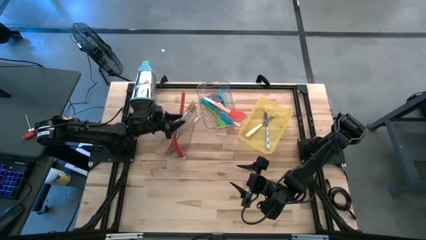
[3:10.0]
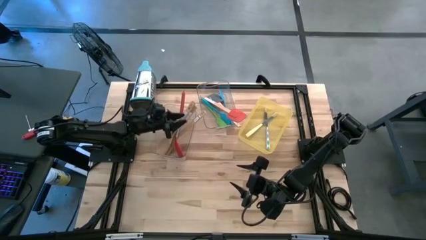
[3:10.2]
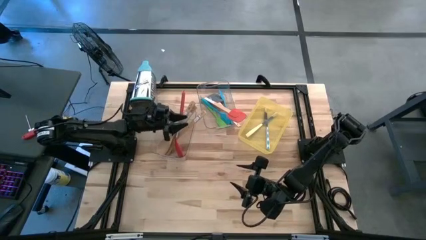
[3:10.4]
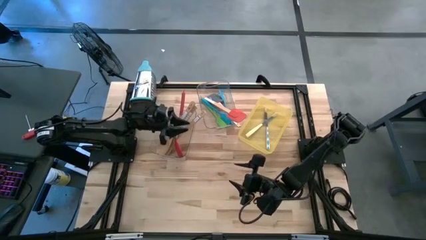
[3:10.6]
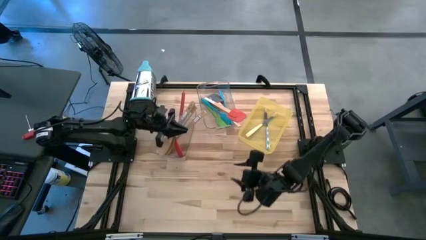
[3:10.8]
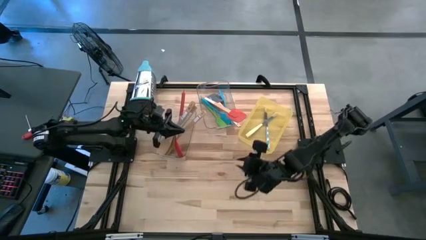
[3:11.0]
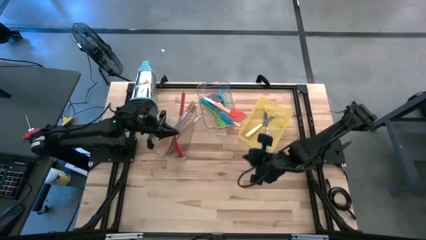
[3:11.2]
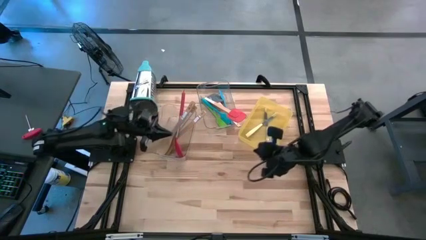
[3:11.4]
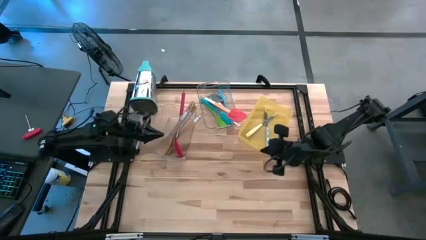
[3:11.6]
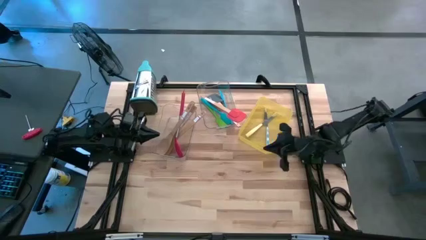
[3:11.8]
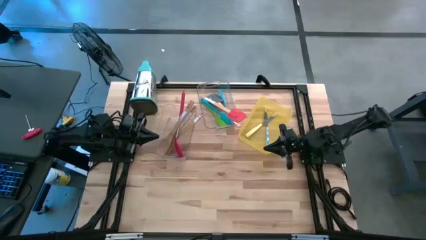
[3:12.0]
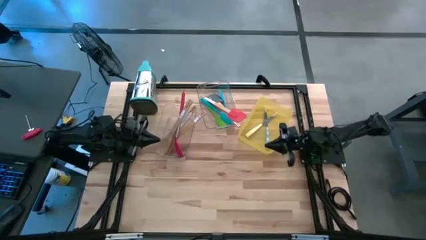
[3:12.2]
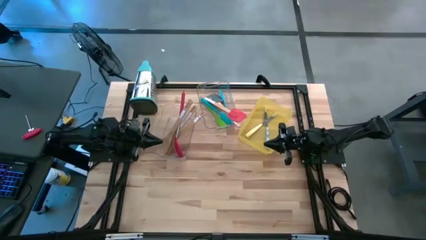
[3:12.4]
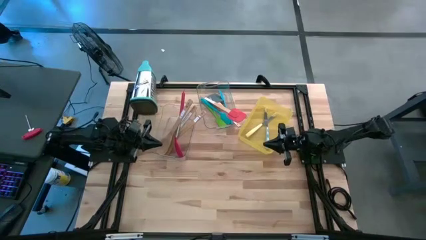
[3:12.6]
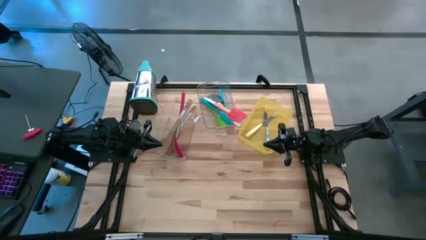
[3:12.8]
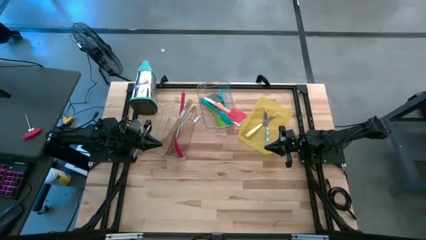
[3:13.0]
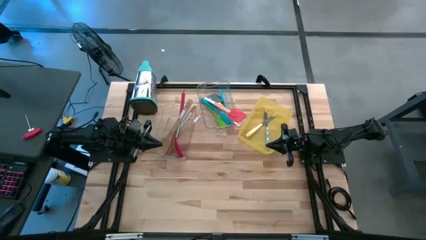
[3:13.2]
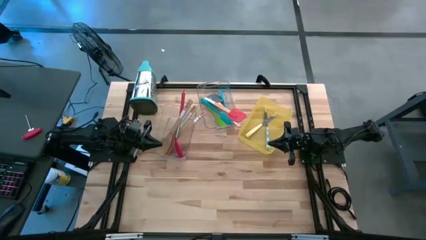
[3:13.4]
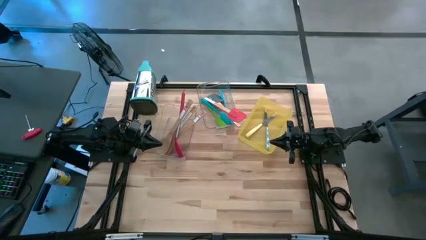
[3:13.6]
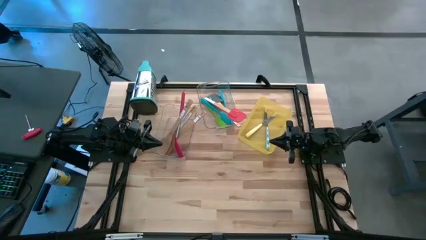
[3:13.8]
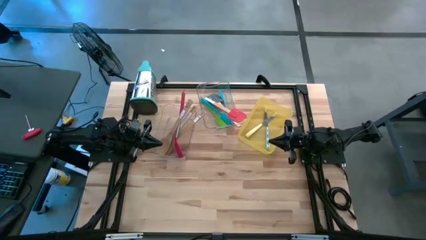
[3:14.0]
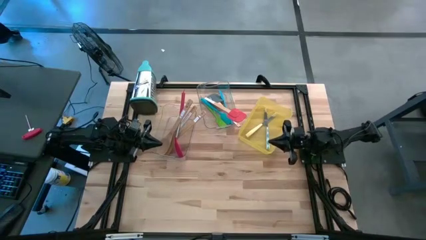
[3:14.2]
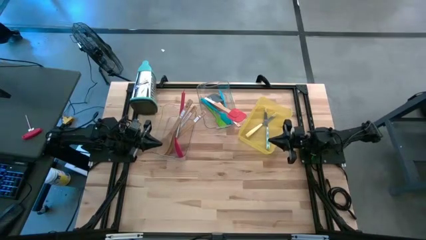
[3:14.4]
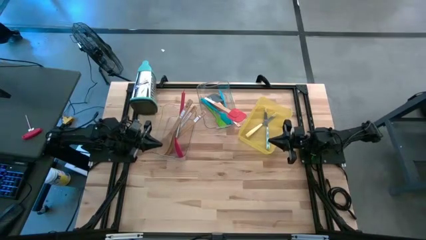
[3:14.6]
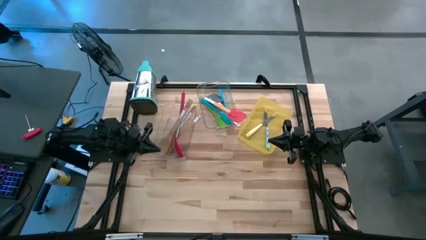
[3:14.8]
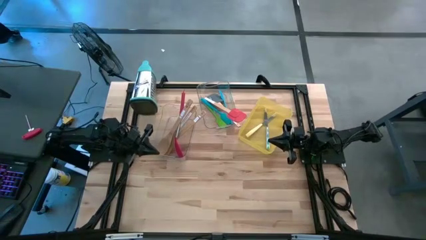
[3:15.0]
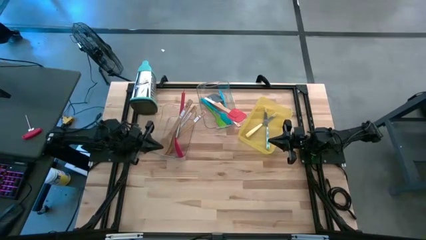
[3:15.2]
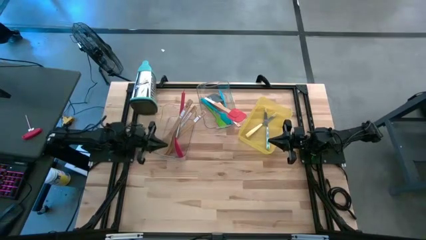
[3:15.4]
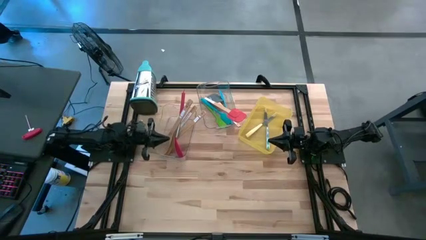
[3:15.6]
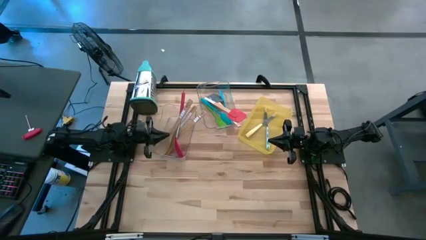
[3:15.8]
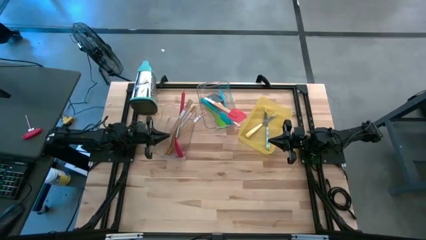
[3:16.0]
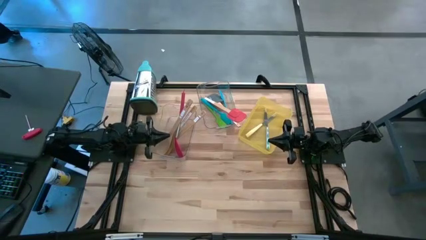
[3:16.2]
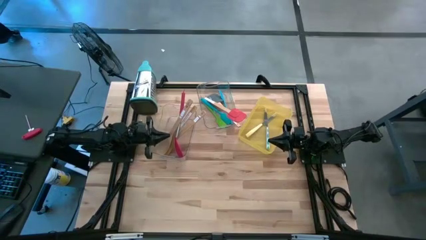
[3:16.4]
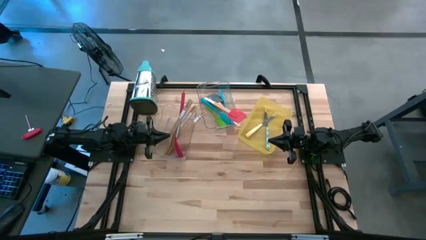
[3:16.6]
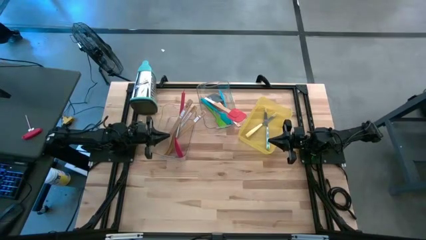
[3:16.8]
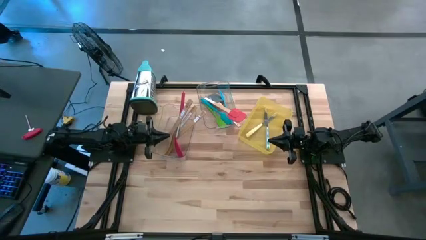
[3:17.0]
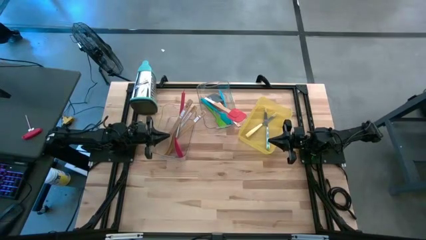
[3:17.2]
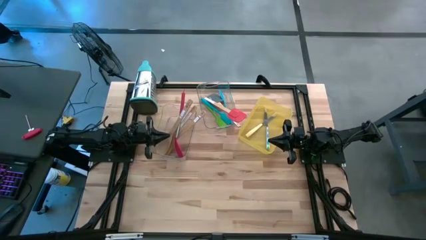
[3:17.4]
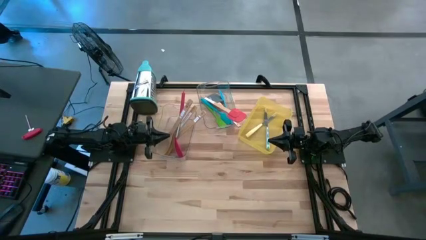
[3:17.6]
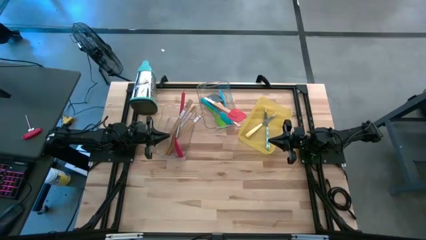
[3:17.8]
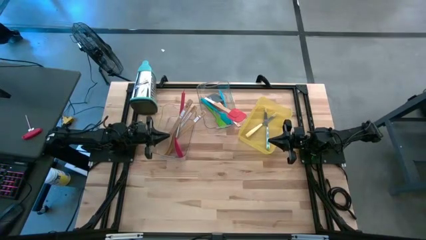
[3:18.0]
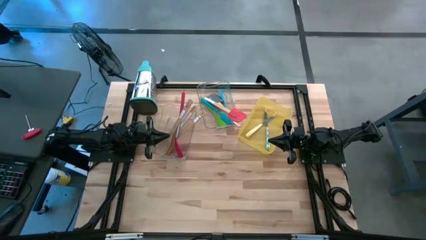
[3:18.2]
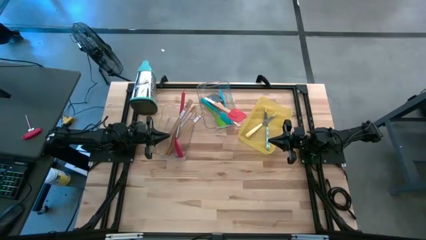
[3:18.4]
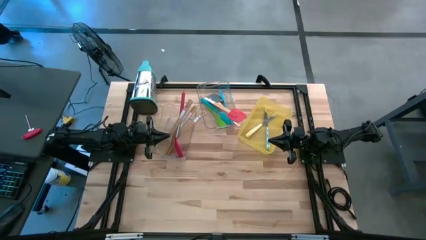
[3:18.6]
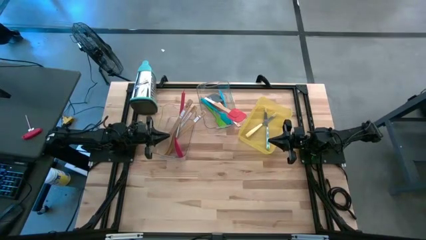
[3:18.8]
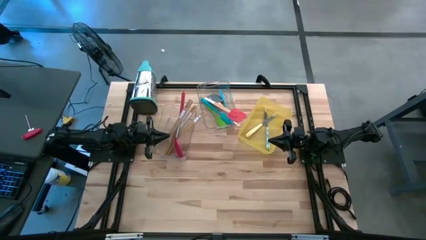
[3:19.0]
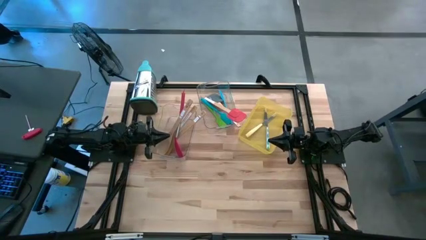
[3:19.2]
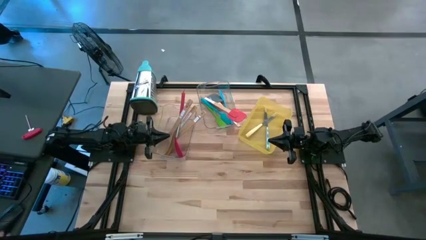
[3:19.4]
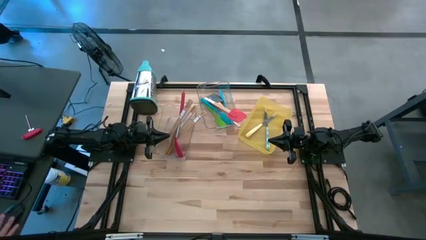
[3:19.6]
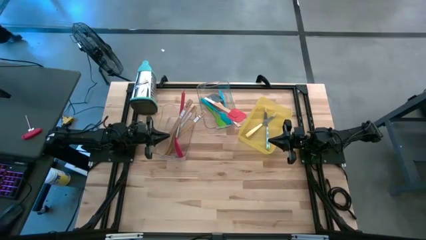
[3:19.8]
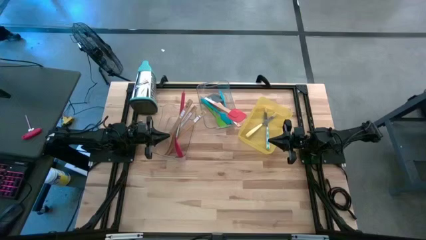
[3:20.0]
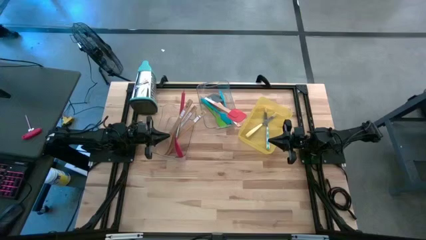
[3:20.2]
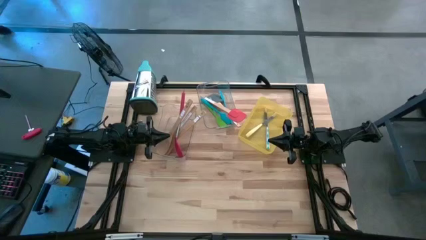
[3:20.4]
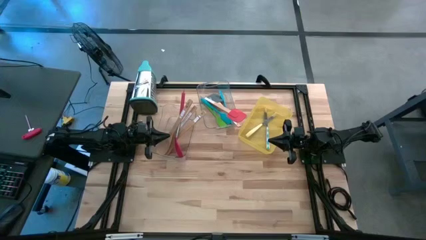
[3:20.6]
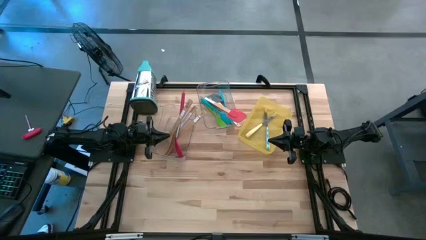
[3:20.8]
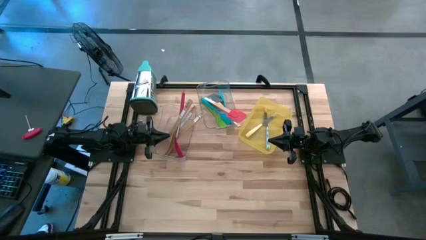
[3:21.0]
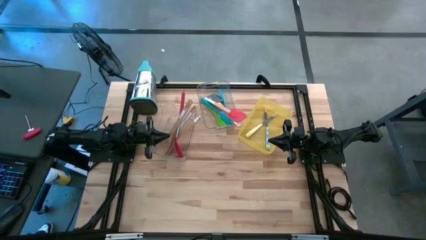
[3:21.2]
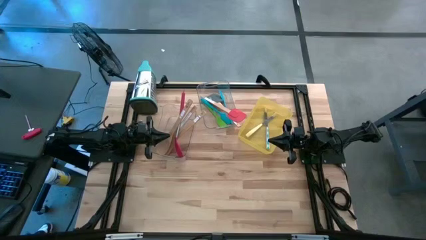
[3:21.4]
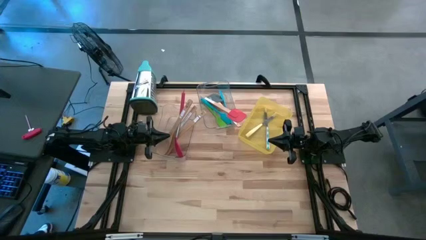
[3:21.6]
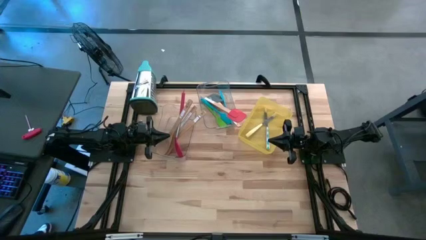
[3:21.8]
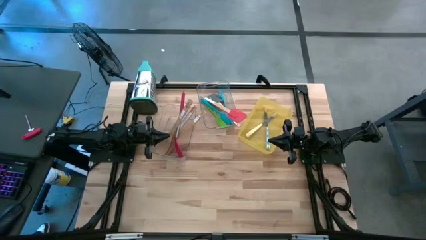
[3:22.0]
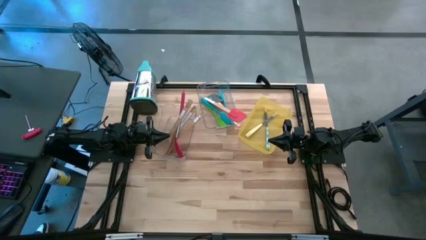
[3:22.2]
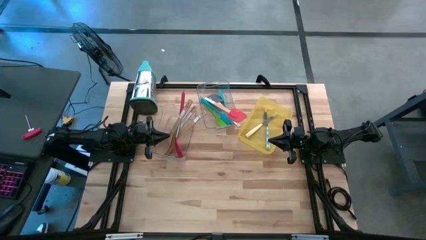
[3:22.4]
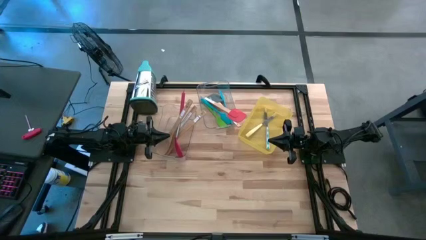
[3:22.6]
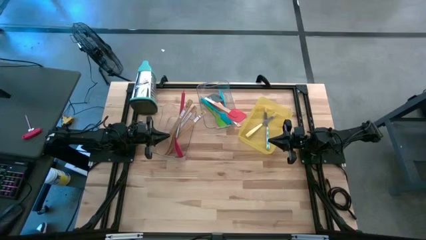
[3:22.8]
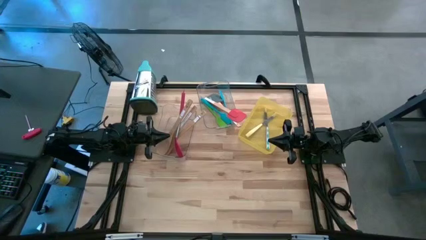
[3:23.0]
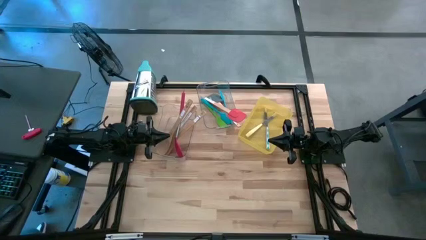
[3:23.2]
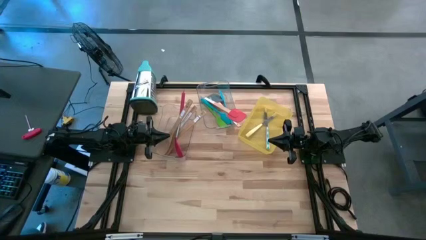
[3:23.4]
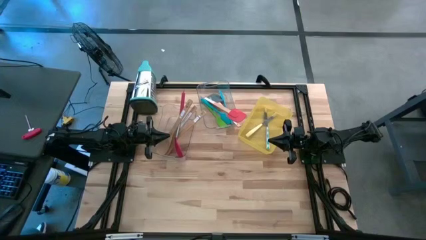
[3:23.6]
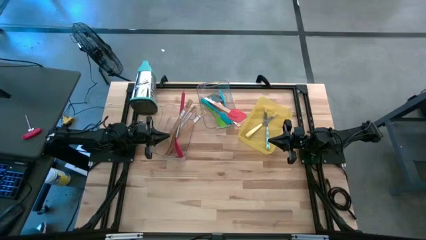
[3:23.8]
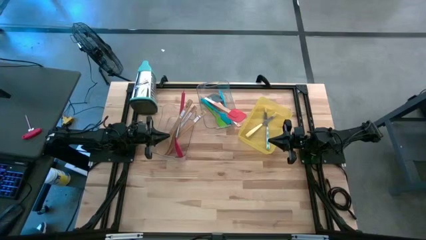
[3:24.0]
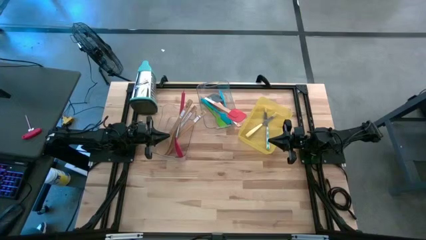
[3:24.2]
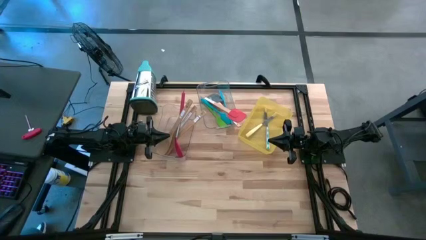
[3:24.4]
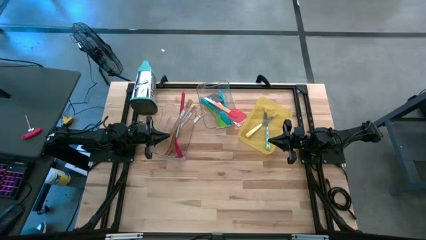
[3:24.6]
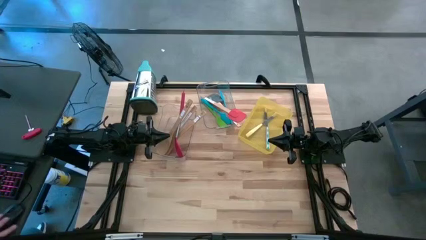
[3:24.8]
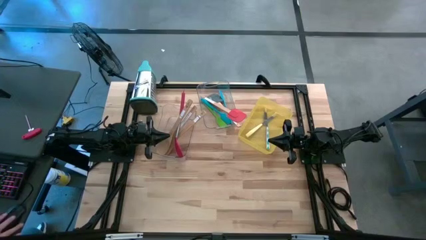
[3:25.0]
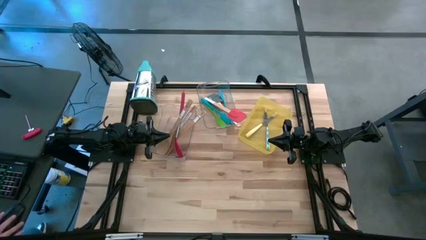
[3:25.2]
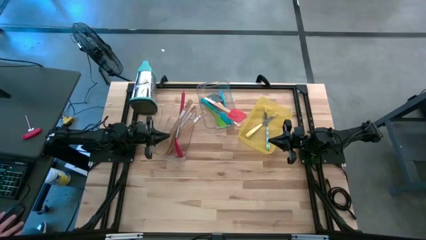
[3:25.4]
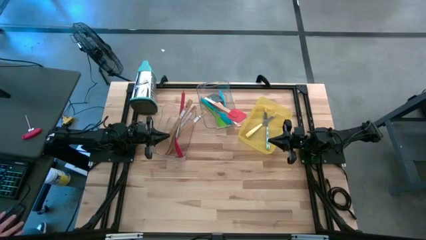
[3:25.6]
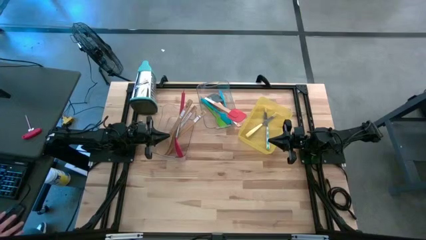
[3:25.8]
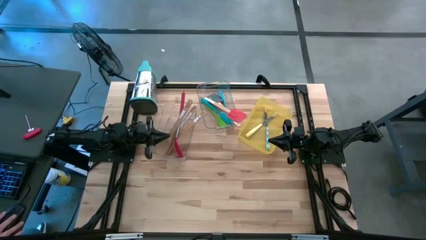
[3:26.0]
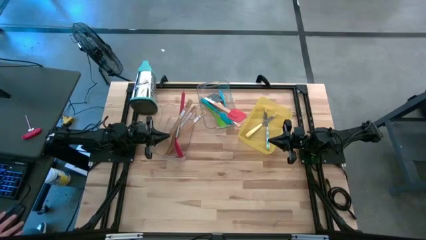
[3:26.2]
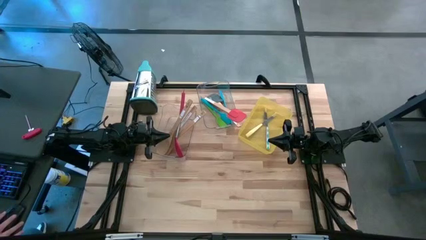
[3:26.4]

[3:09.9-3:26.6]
Task: Pick & Place Kitchen Items
Return to Home Position
